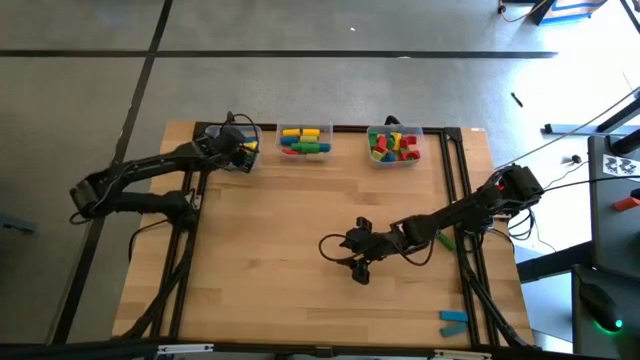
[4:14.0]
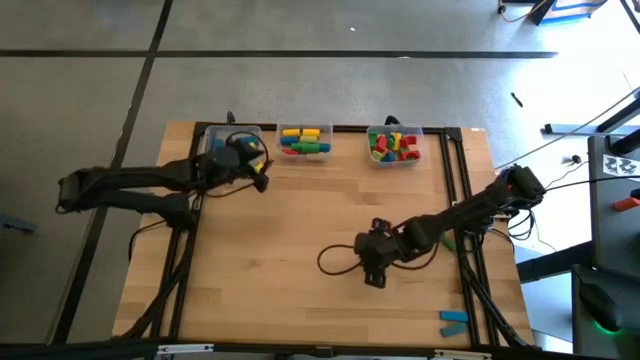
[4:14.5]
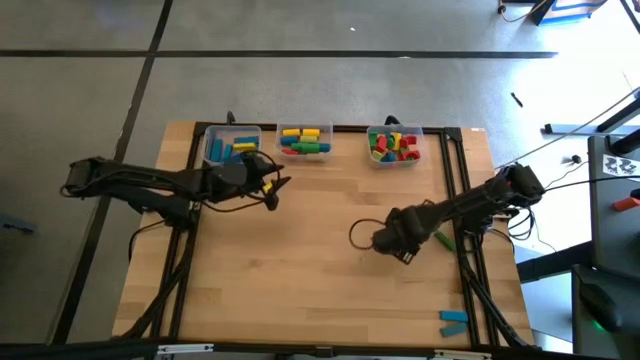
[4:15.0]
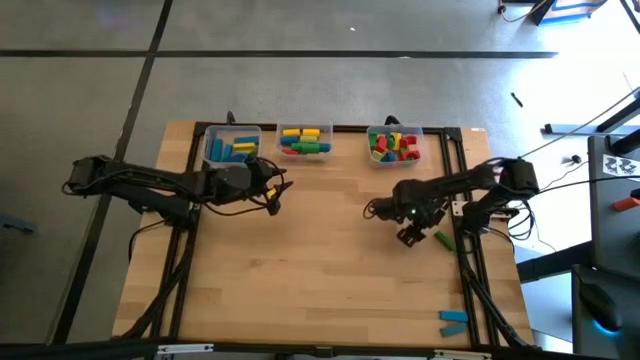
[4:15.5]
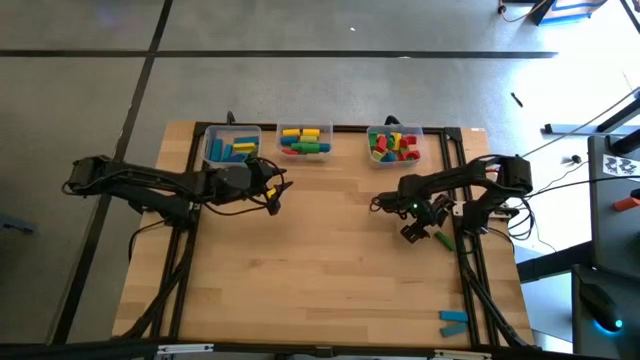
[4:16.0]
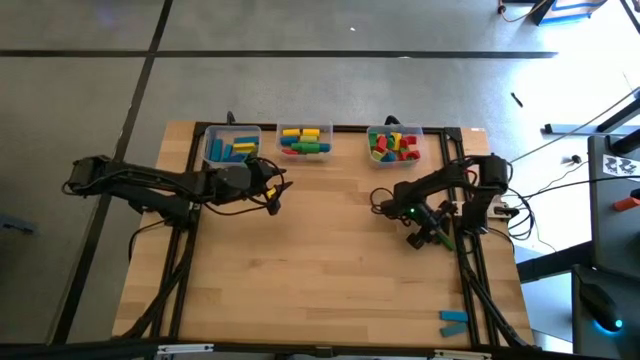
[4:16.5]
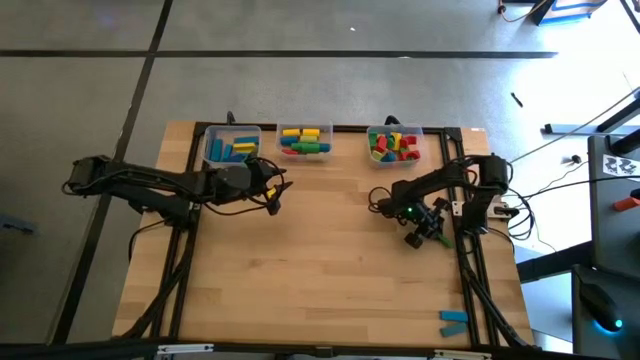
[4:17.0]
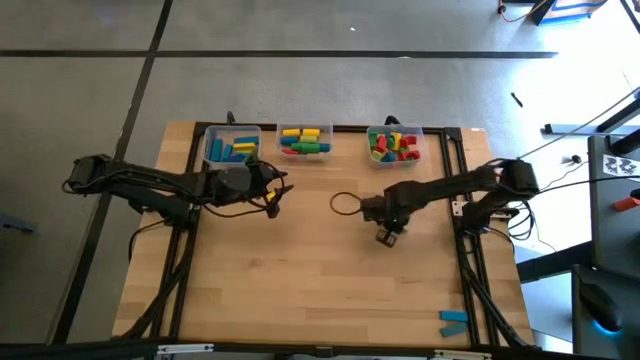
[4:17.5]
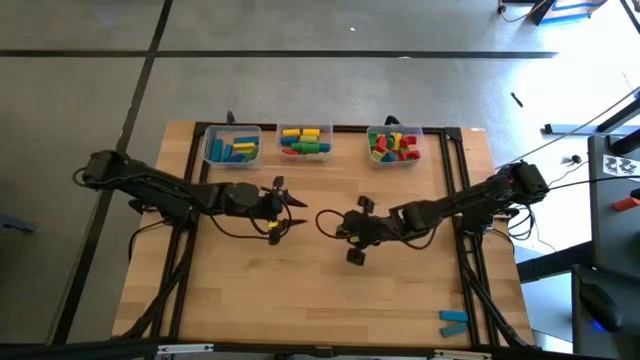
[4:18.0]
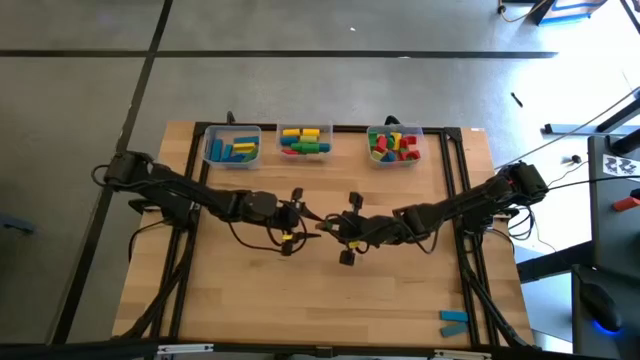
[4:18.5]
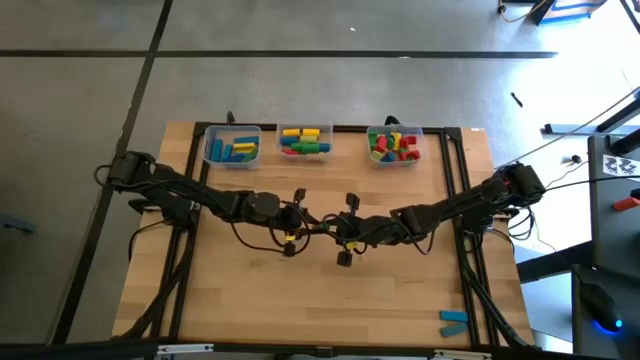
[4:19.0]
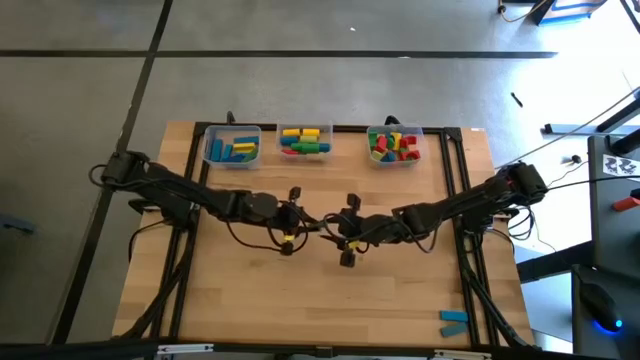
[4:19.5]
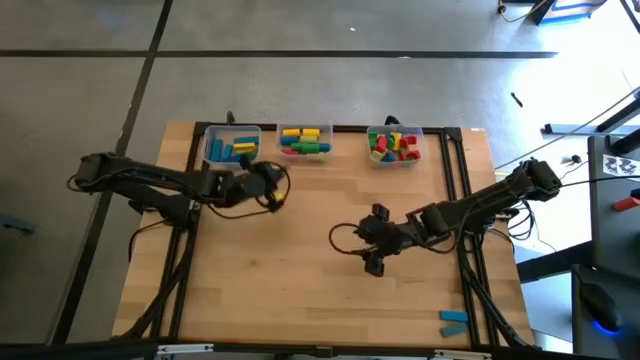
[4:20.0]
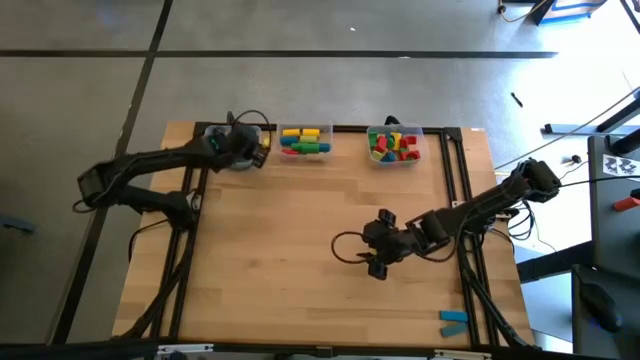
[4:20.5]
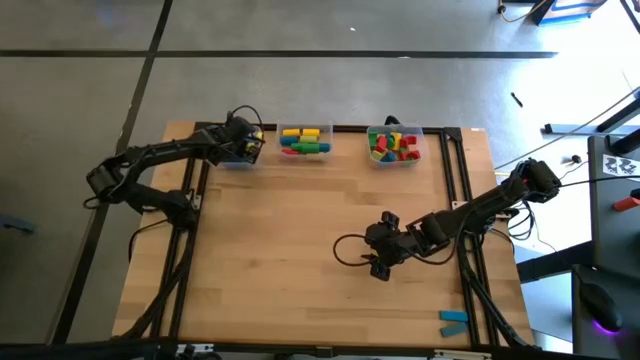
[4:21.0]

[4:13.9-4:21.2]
Task: Sort blocks by size
Put the green rectangular block into the left transparent bin

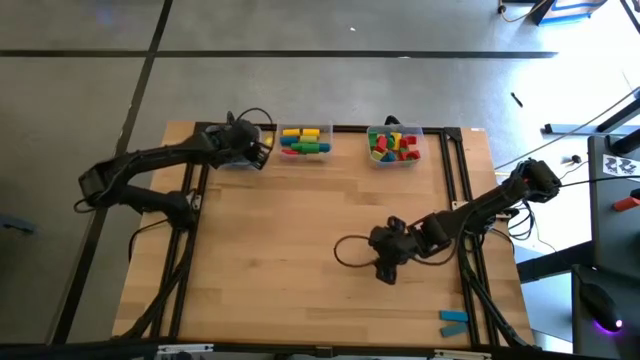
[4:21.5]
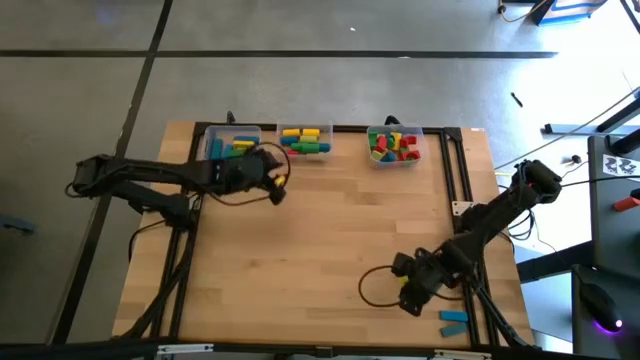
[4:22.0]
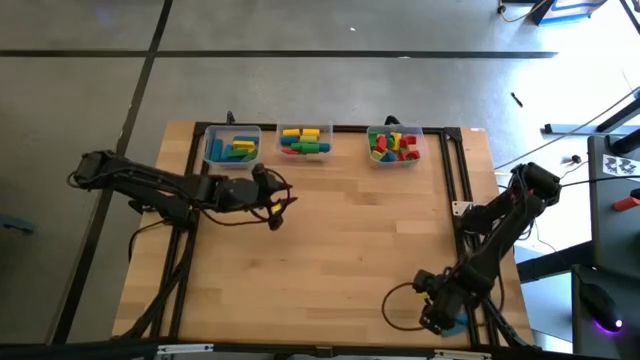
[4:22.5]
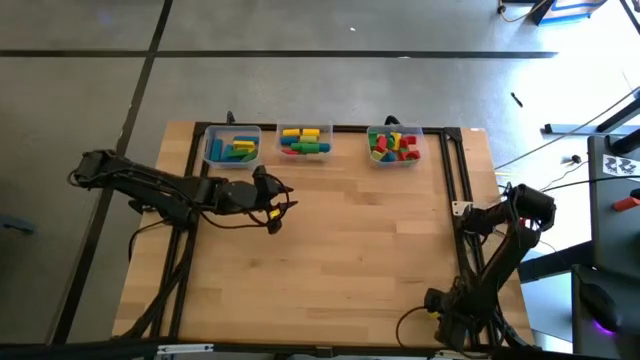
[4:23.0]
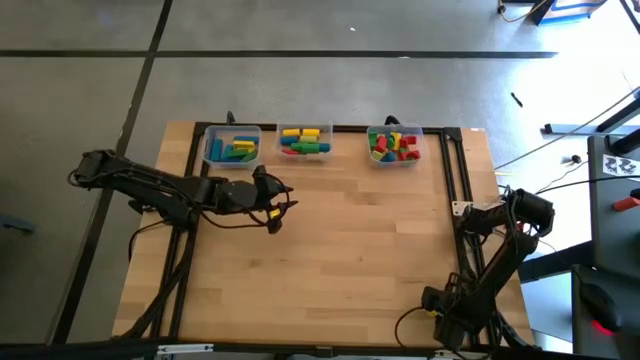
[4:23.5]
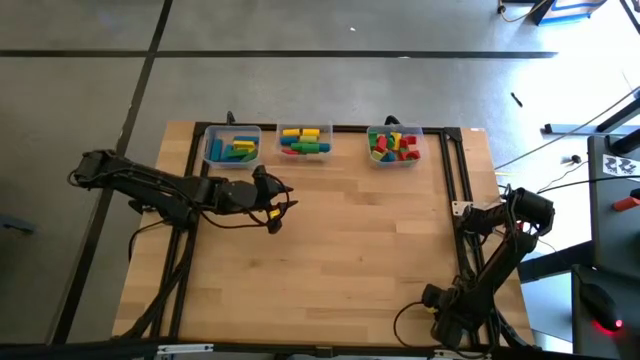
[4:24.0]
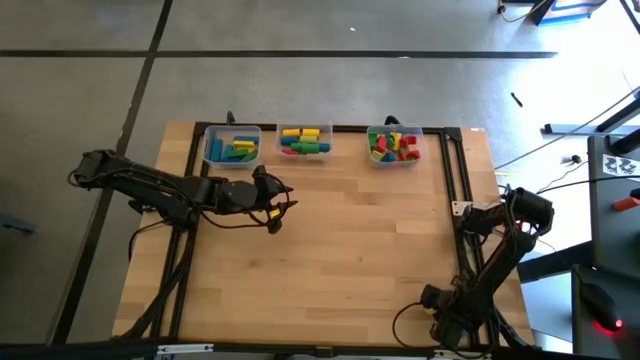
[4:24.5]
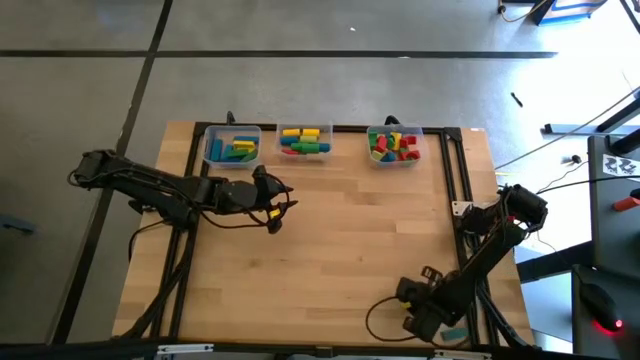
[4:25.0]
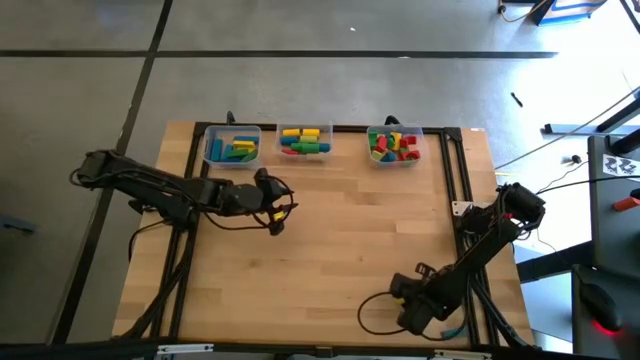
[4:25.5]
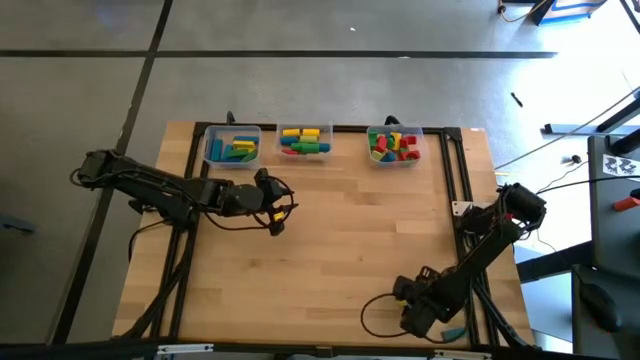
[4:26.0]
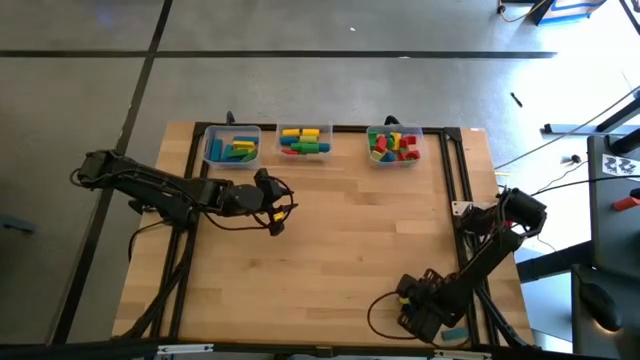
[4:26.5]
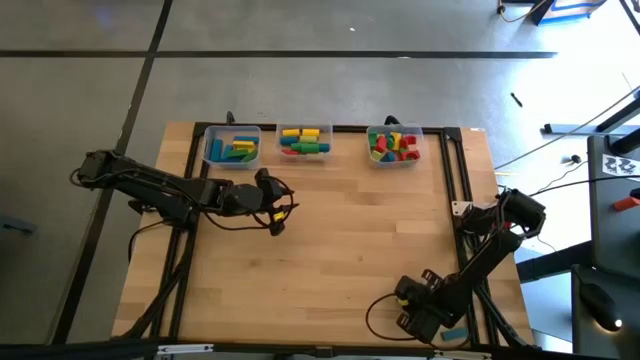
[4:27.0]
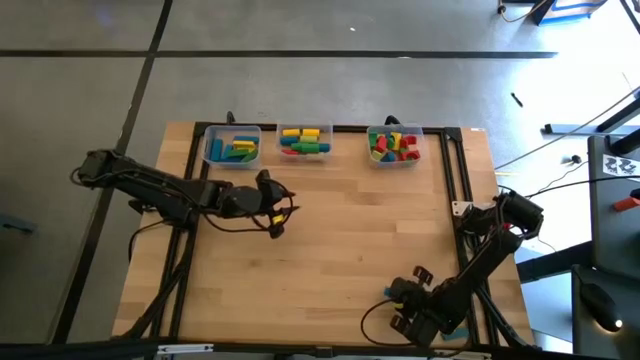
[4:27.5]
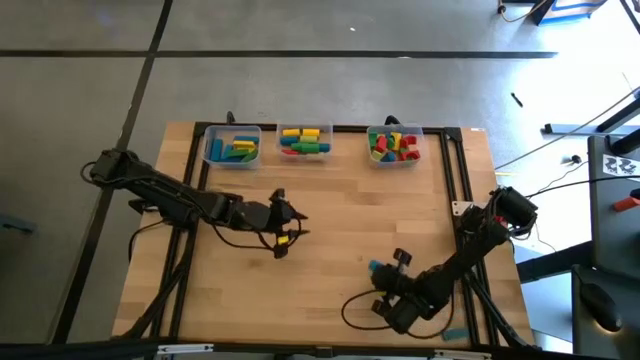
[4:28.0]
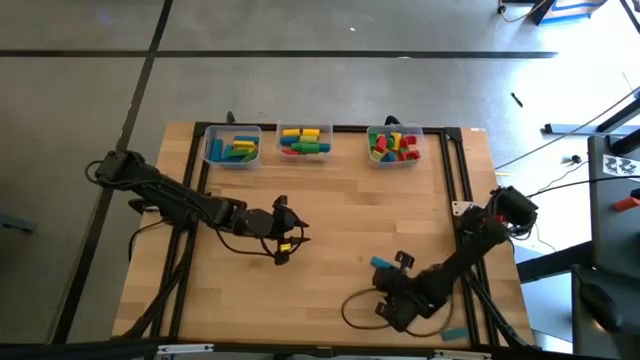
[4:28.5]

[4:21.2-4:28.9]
Put the light blue rectangular block into the left transparent bin

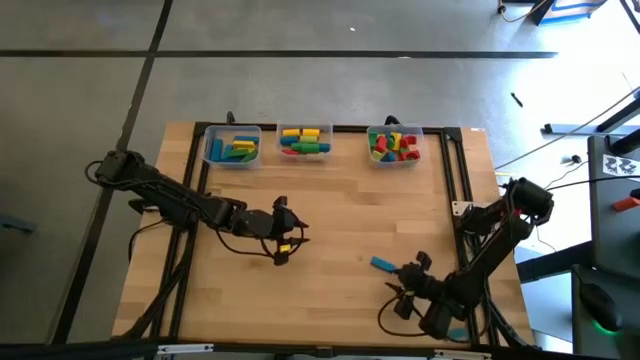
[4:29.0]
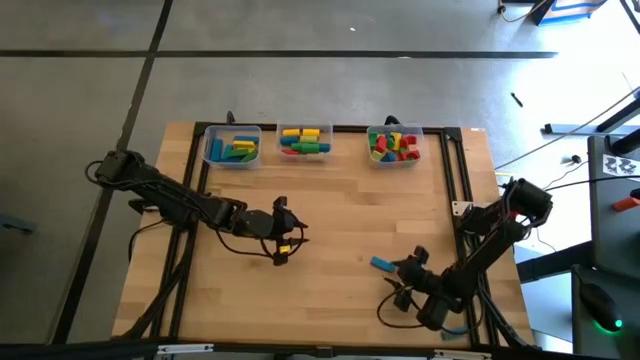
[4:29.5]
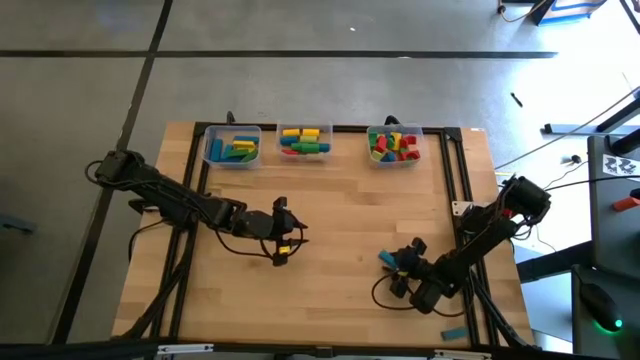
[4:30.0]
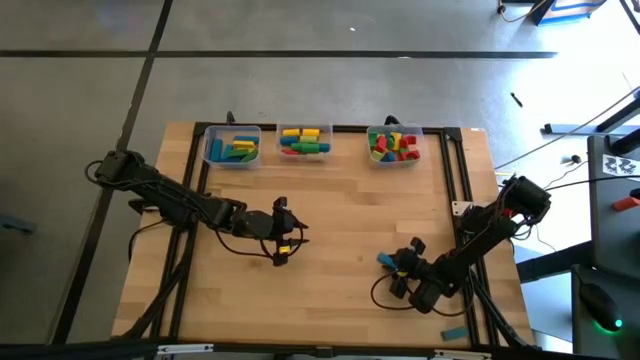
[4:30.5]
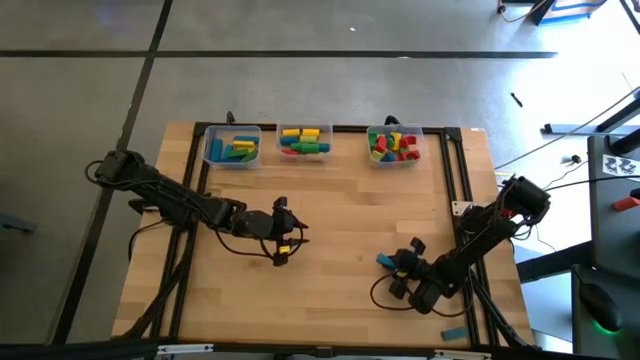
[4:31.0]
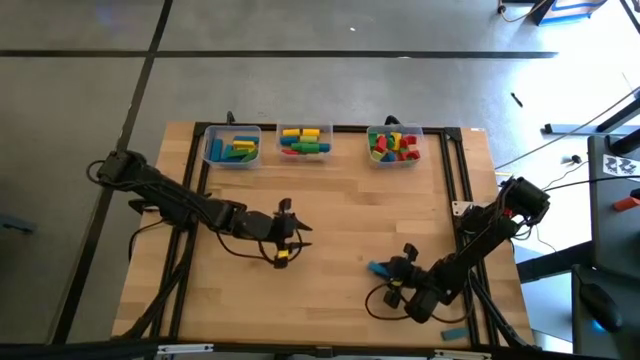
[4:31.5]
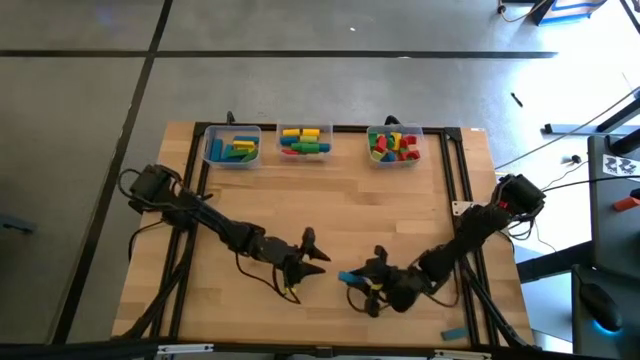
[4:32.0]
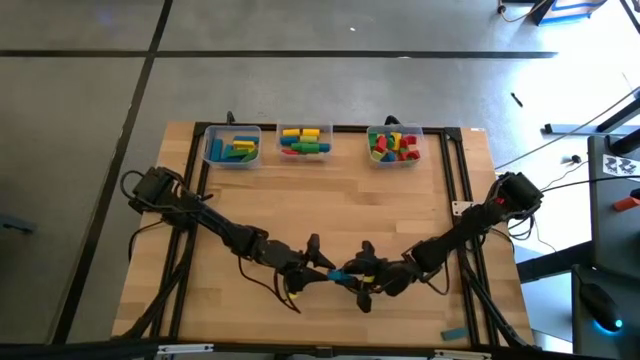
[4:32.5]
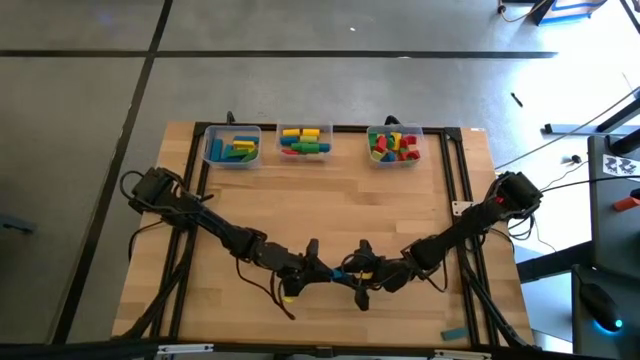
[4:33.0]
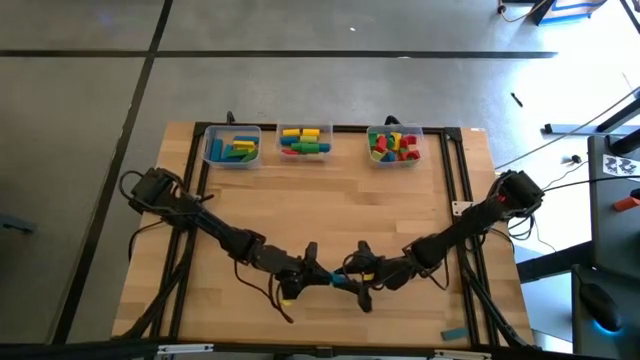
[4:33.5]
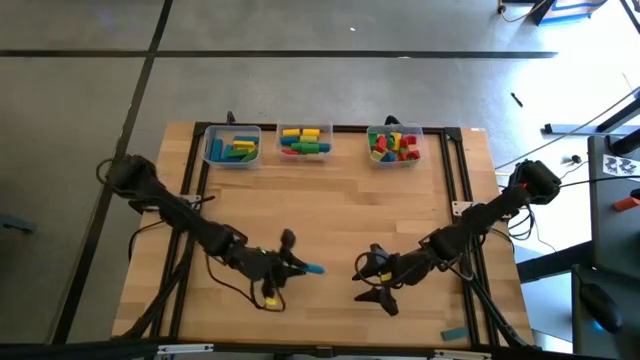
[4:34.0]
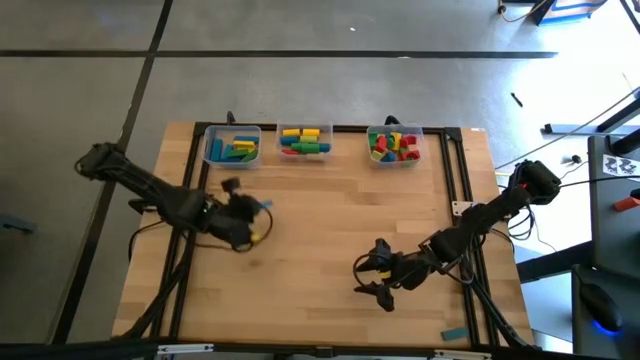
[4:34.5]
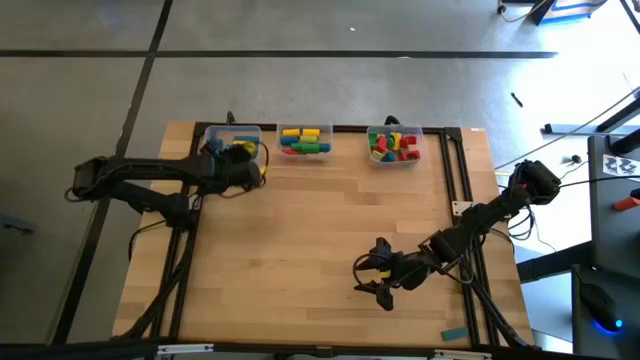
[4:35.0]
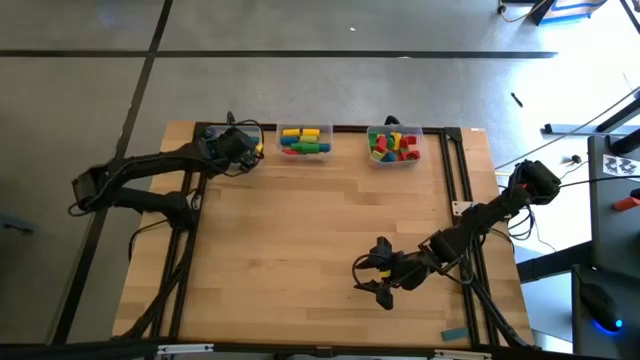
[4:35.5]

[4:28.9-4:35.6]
Put the blue rectangular block into the left transparent bin
